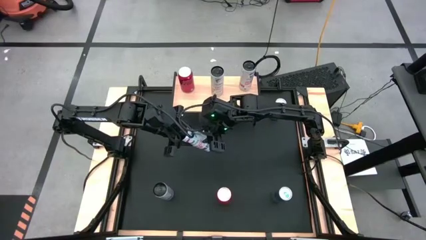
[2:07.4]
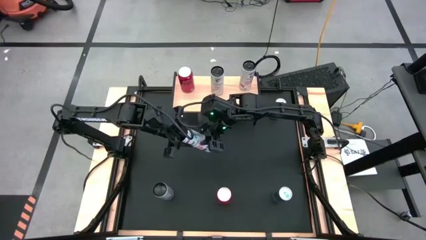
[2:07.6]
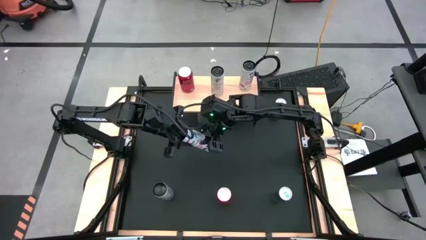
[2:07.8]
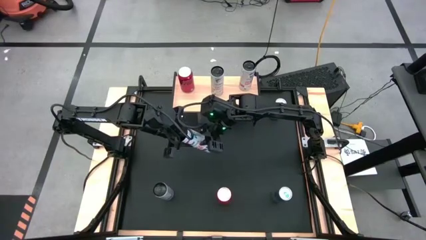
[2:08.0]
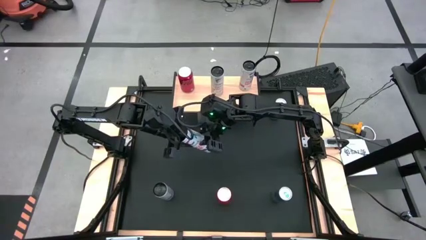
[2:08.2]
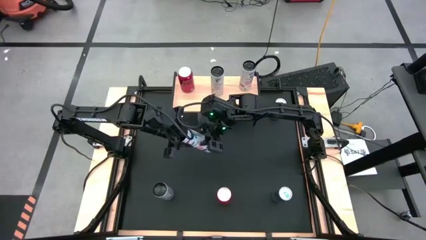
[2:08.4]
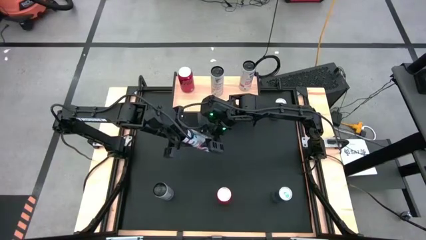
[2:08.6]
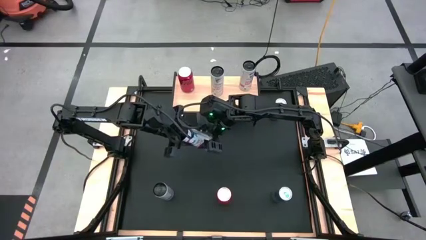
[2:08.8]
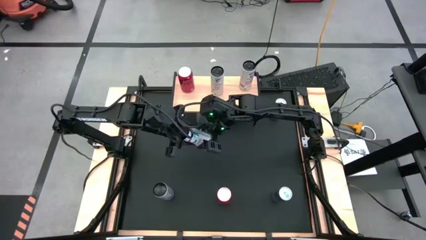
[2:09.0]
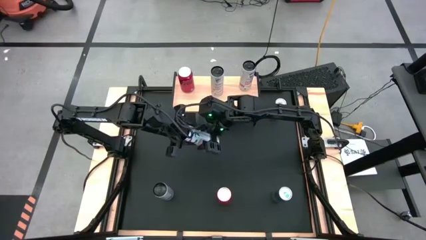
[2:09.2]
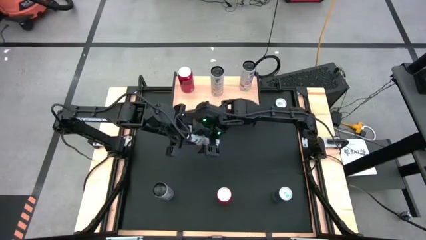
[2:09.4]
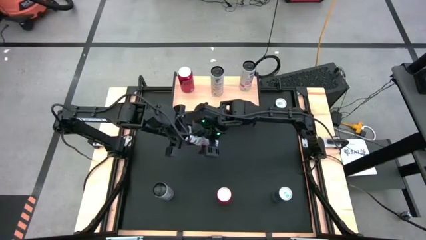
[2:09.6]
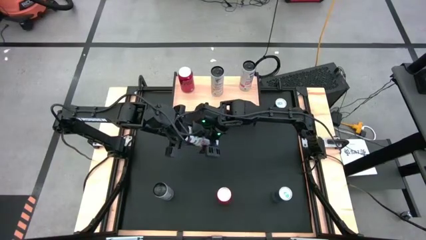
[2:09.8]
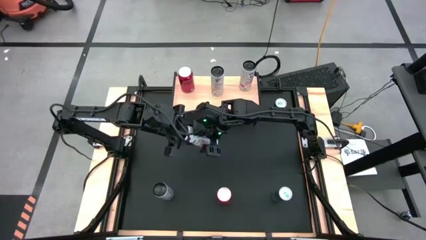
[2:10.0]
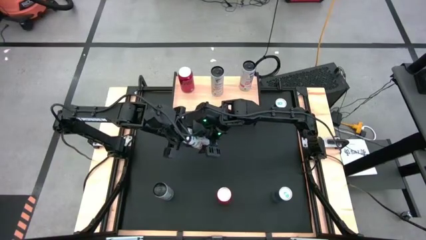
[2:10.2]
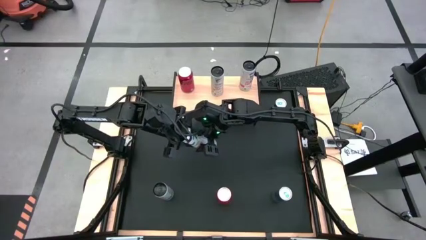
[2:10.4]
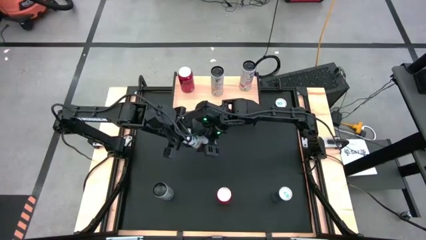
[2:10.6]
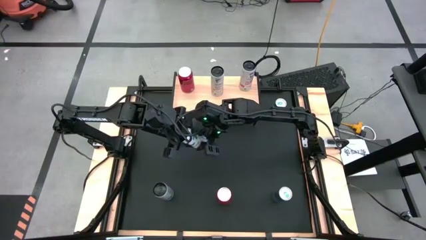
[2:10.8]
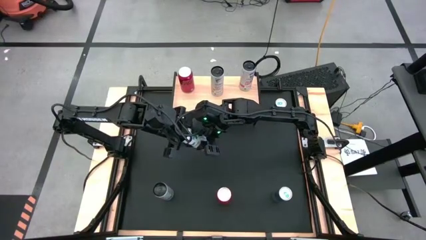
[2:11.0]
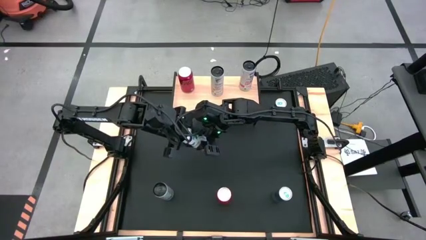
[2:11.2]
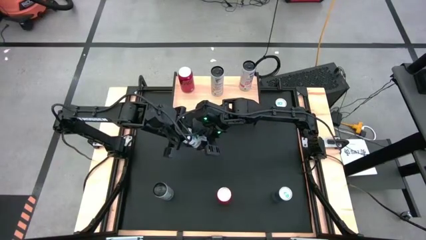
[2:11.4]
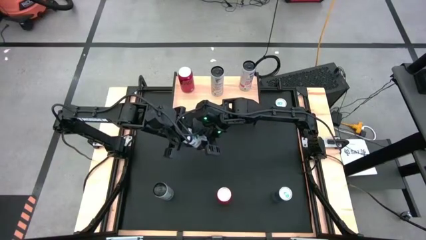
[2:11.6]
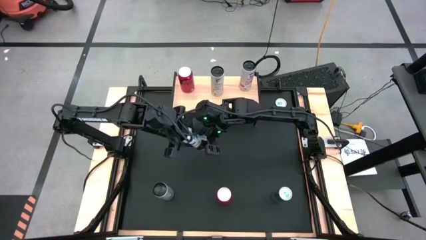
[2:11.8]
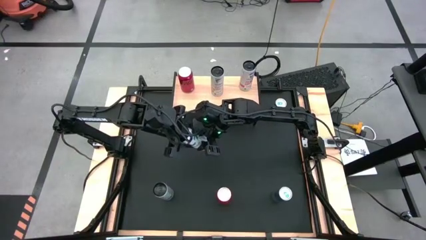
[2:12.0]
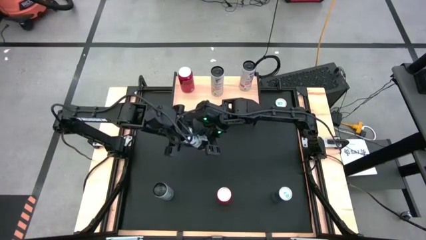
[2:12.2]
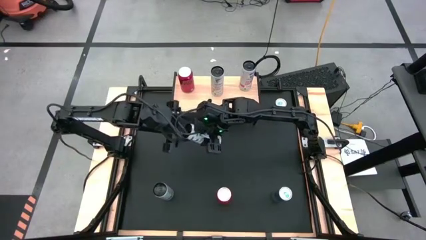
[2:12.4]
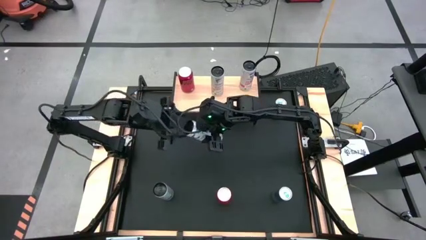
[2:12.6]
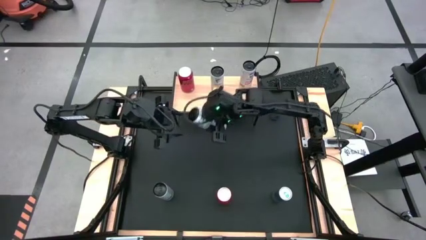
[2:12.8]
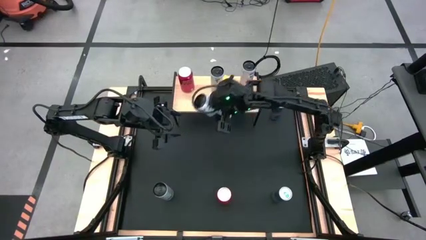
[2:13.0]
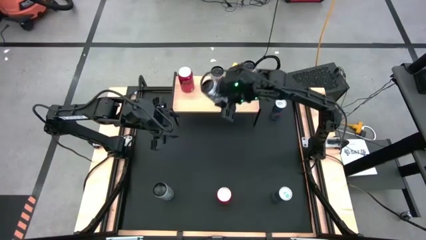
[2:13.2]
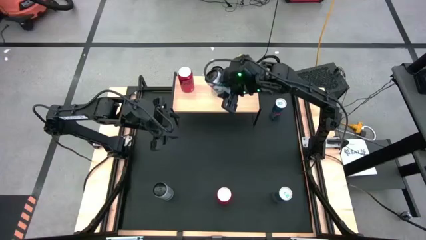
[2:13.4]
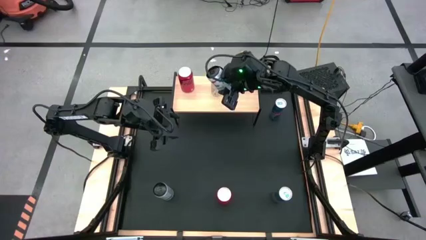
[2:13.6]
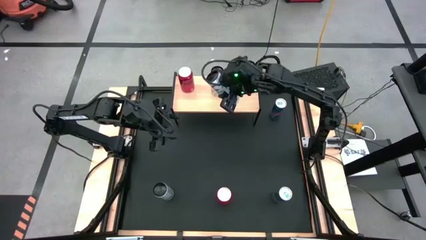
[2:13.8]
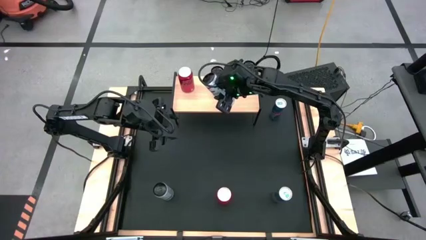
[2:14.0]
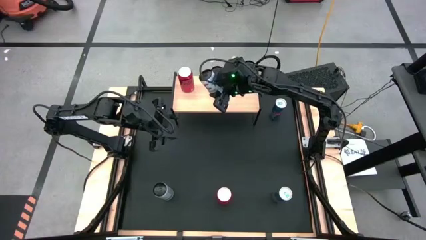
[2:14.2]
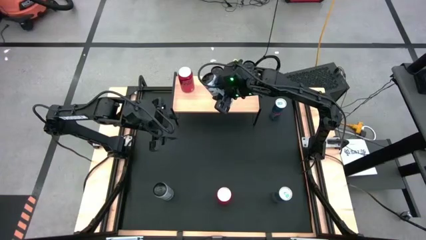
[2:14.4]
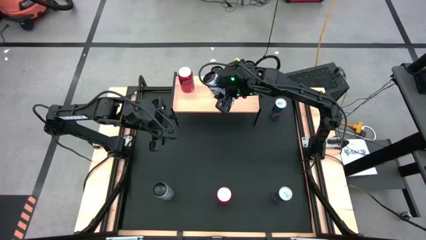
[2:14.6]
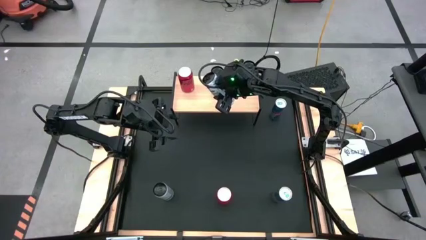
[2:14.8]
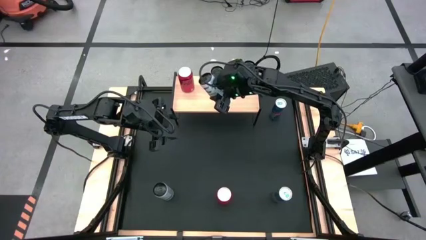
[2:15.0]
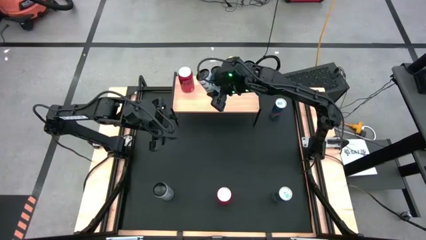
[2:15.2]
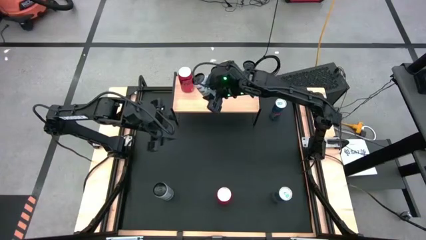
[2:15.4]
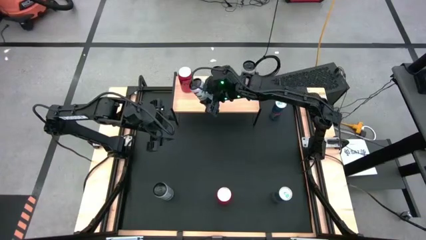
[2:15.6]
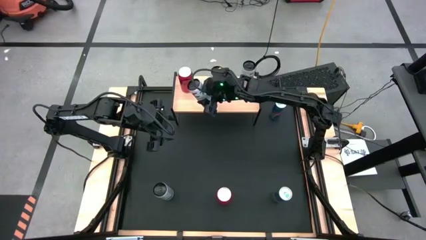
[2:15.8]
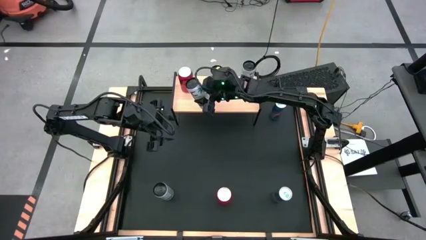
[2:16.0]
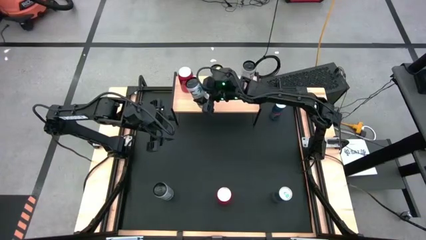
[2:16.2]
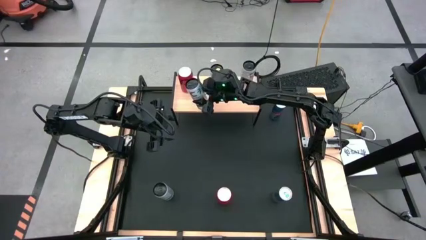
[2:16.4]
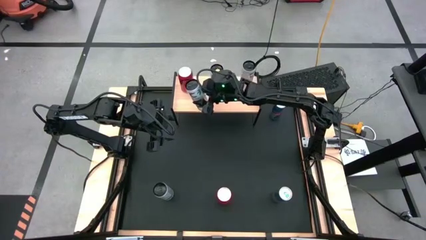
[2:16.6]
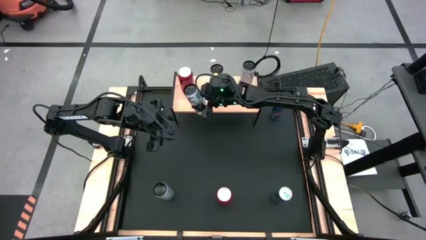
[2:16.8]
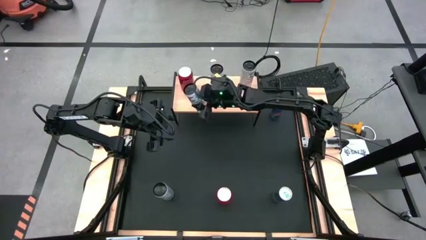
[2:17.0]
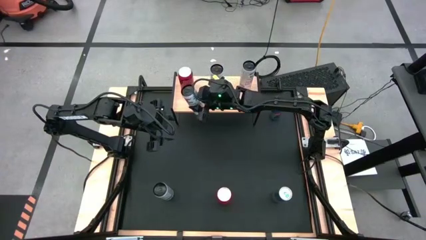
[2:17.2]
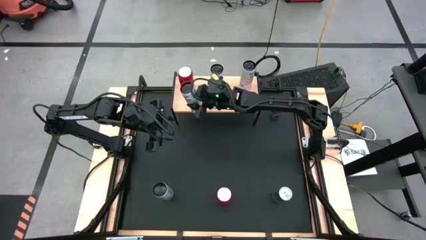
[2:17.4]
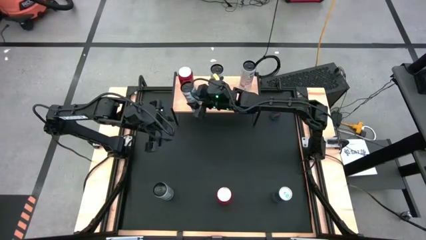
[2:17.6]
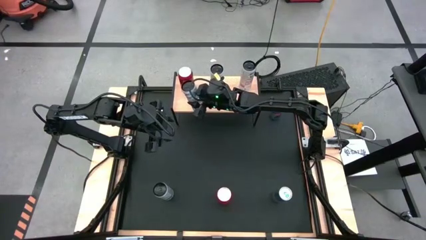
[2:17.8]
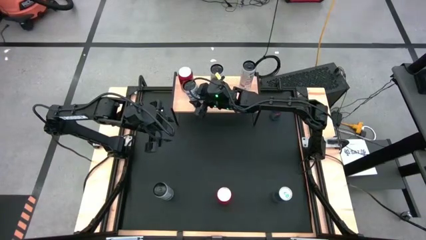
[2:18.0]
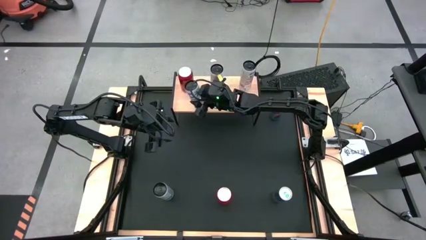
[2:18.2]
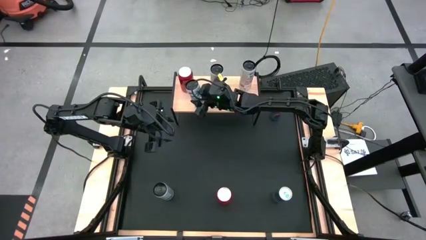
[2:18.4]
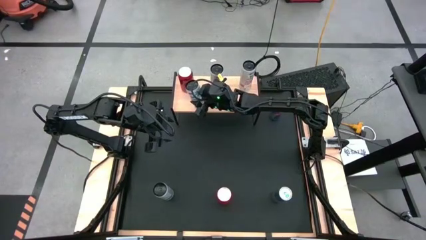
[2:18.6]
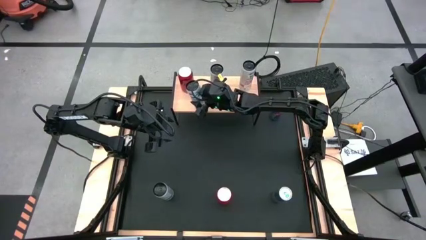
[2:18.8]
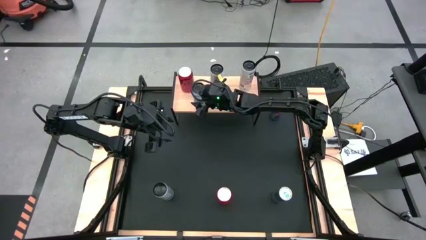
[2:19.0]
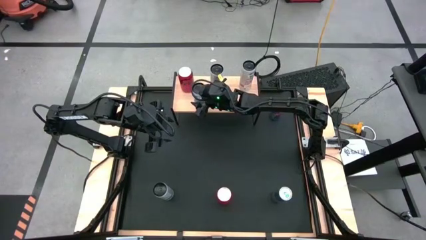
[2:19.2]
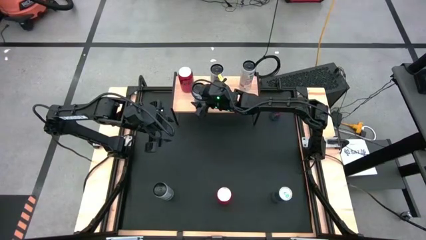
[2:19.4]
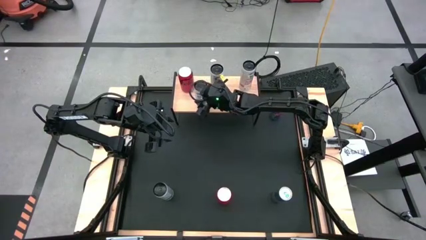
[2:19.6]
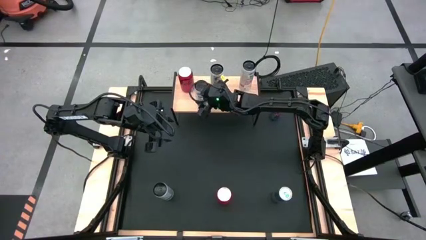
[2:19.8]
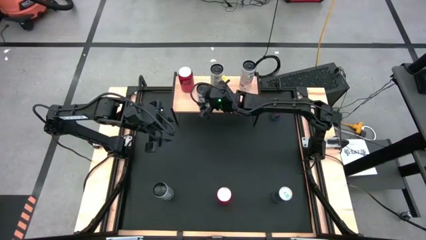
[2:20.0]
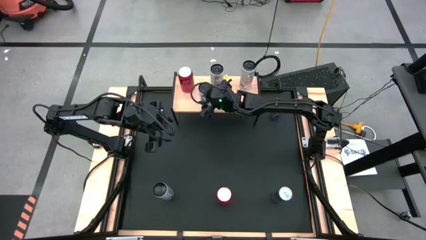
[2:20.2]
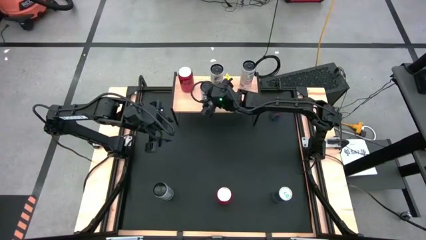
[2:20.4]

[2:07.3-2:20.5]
Task: Place canned beverage on shelf
Put the white pink soda can on the shelf aligned with the other white pink soda can

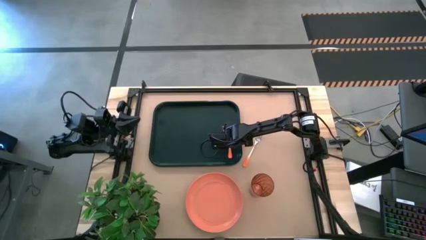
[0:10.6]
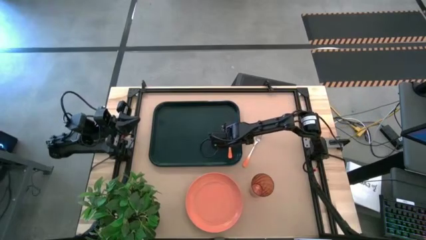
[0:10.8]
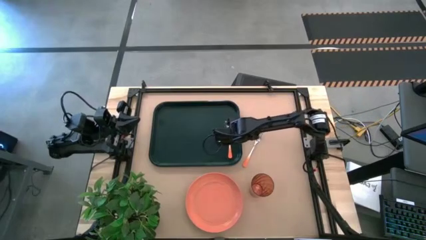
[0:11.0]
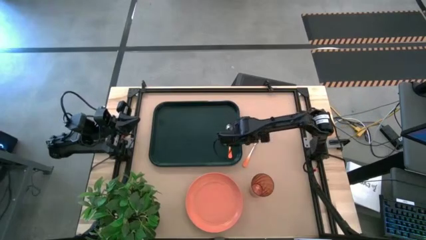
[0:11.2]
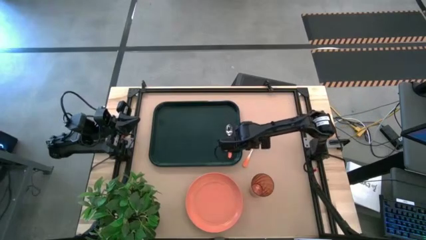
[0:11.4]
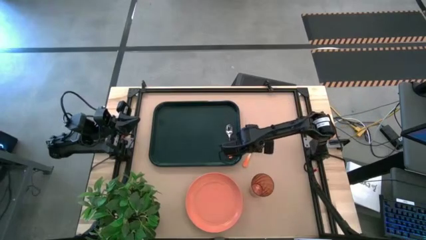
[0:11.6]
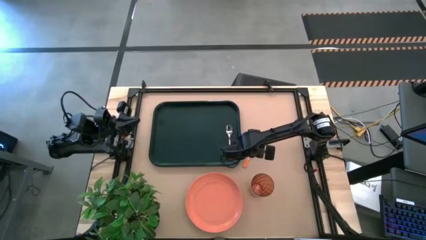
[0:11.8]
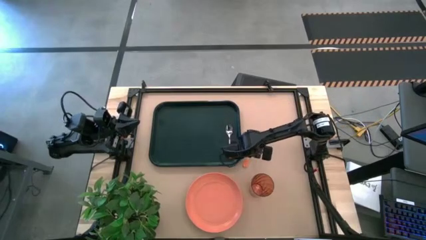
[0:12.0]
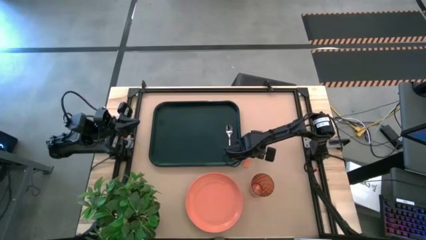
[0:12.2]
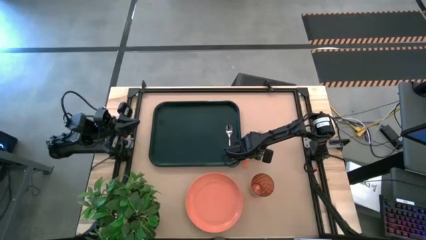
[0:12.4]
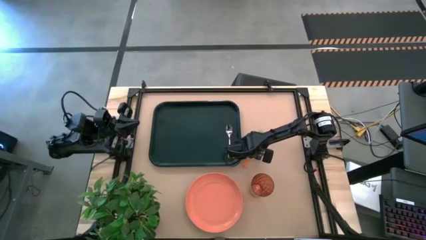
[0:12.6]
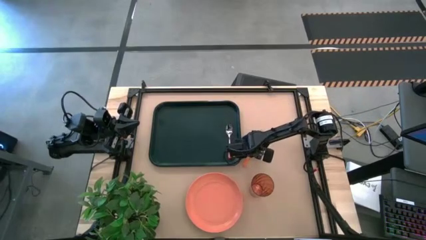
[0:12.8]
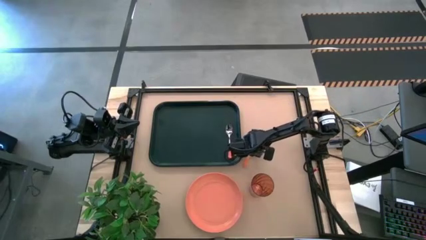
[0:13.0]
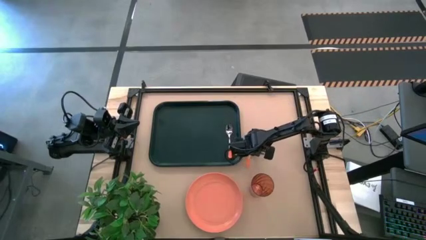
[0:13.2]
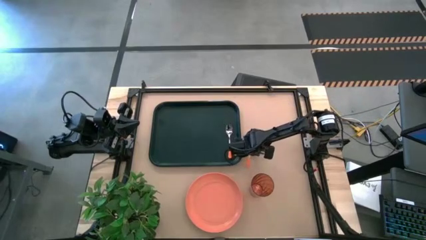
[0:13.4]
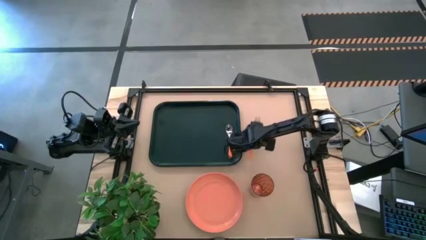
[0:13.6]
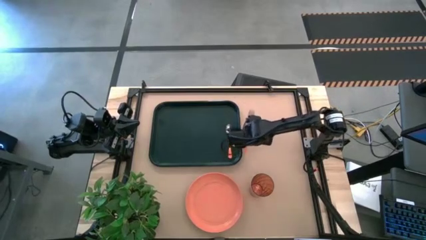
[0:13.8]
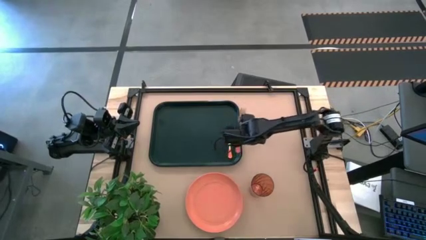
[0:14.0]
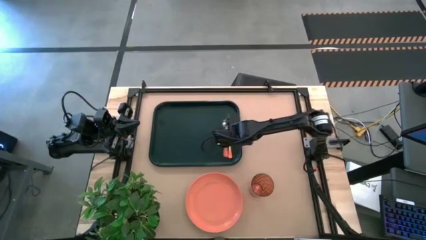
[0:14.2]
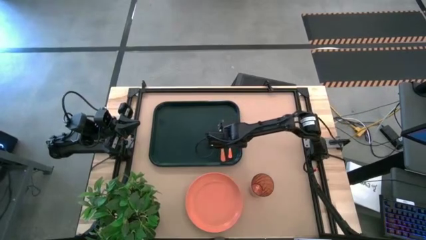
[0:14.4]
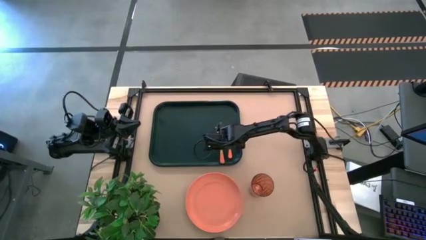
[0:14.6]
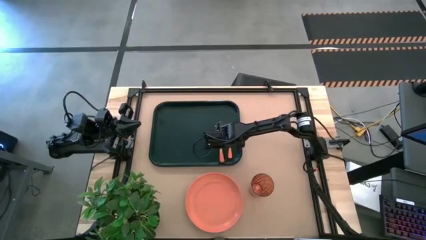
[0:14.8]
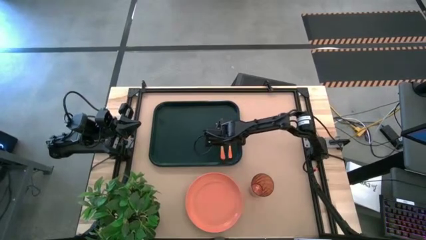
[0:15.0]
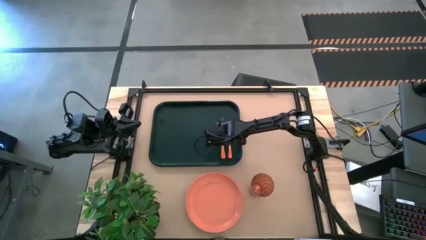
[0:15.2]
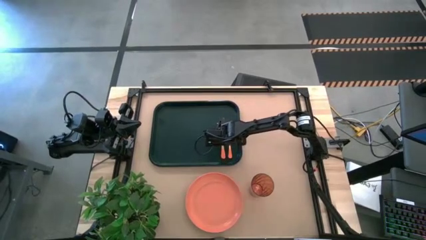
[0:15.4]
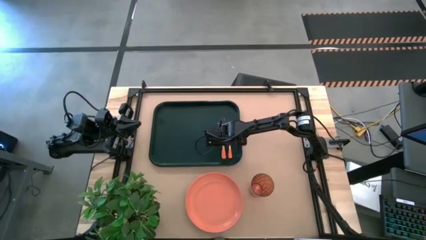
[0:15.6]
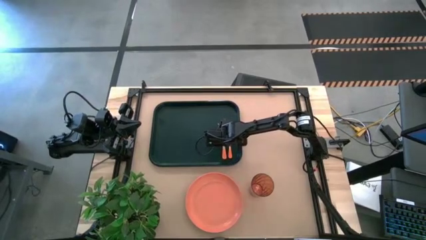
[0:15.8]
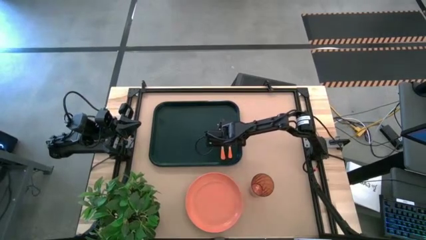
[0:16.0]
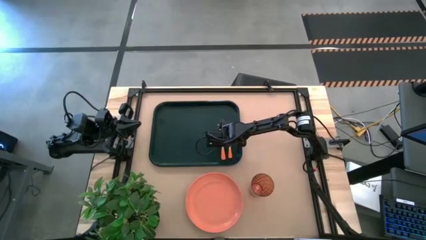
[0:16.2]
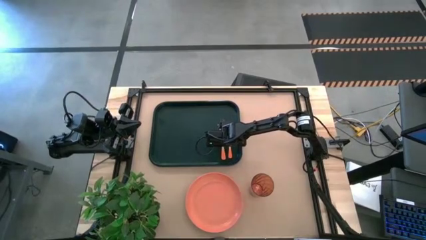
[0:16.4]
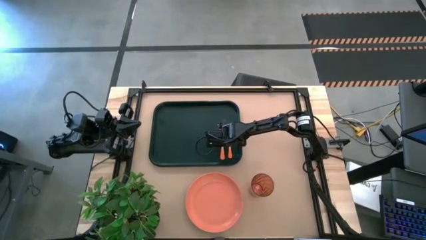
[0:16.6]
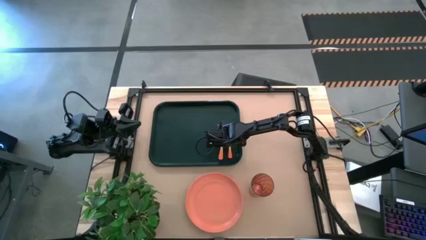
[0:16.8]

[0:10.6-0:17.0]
Task: Pick and place plate/cup/fork/spoon on tray
Put the orange fork on the black table tray
